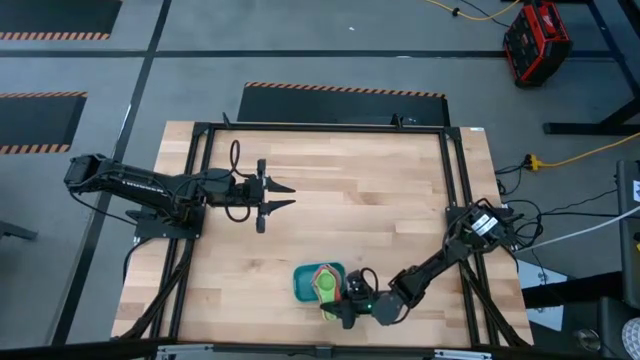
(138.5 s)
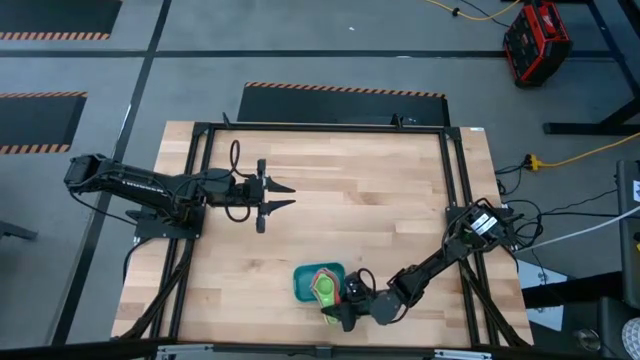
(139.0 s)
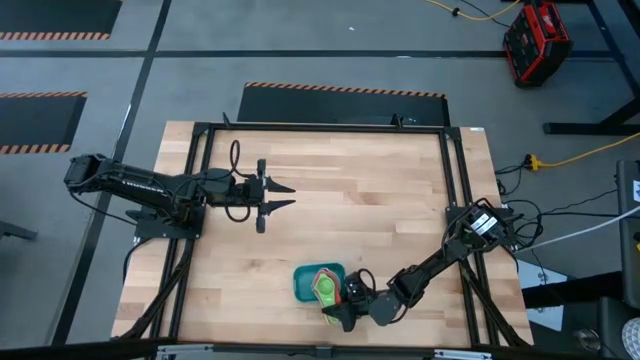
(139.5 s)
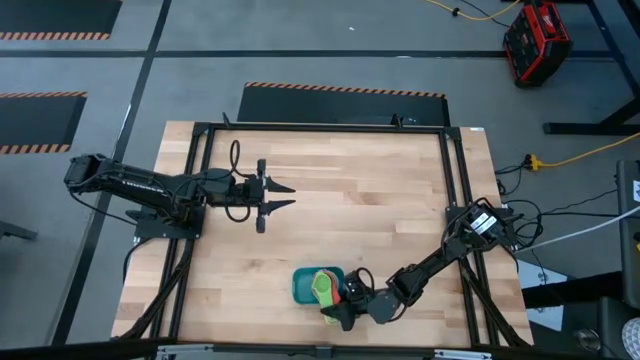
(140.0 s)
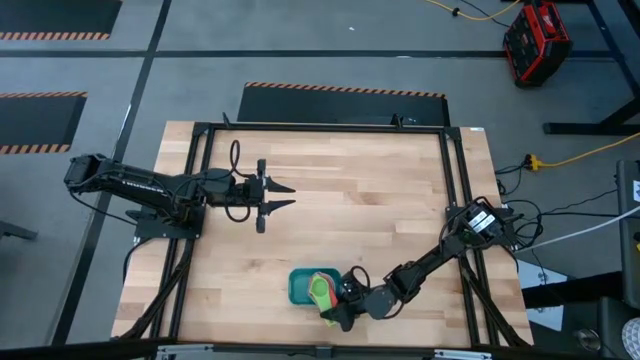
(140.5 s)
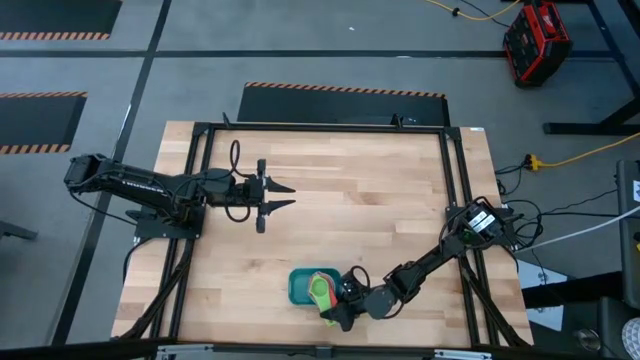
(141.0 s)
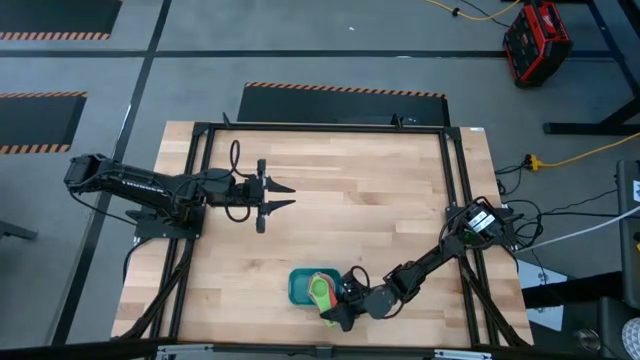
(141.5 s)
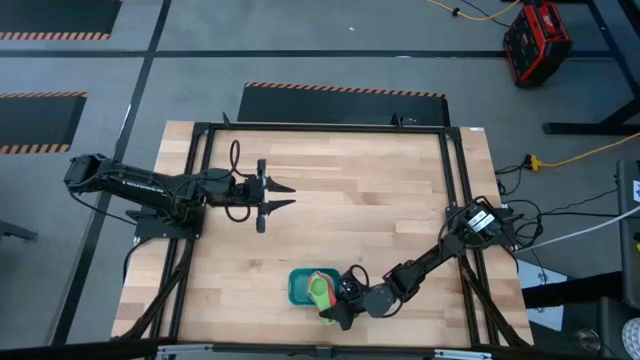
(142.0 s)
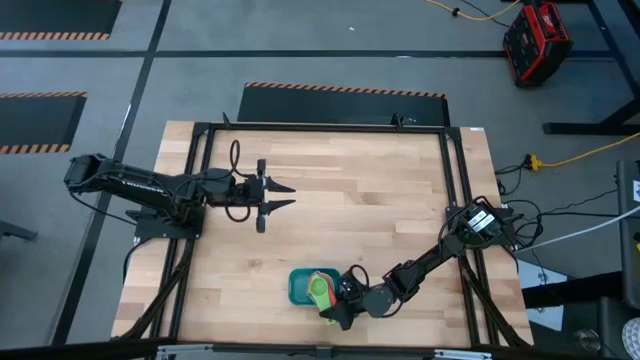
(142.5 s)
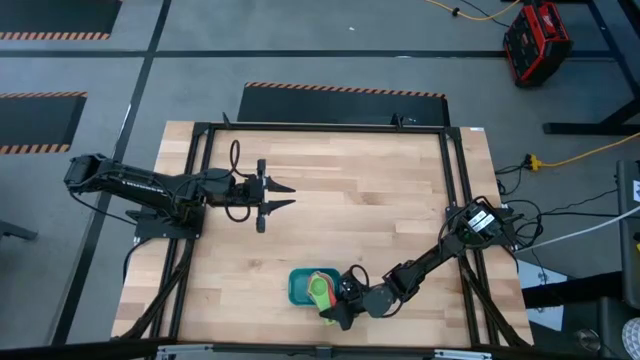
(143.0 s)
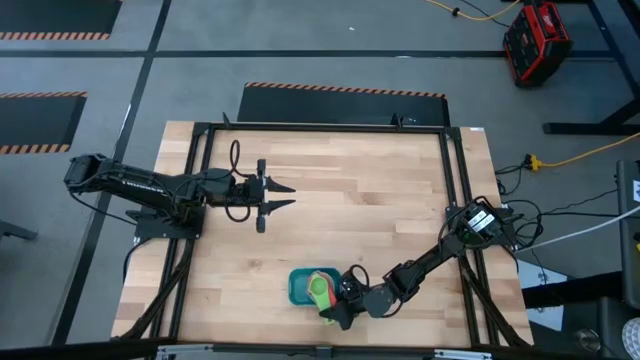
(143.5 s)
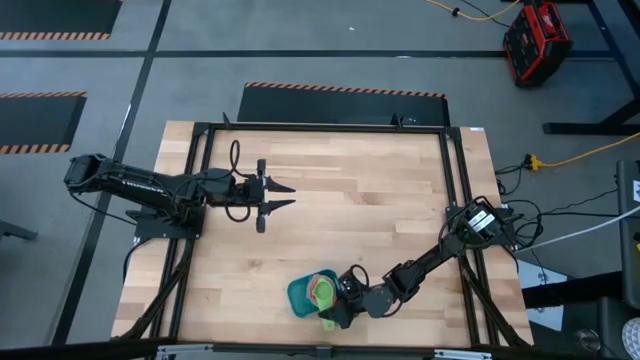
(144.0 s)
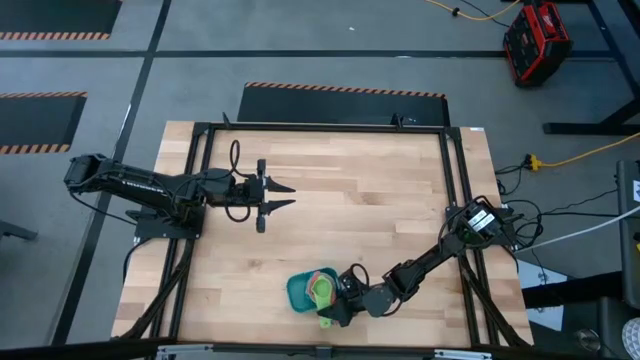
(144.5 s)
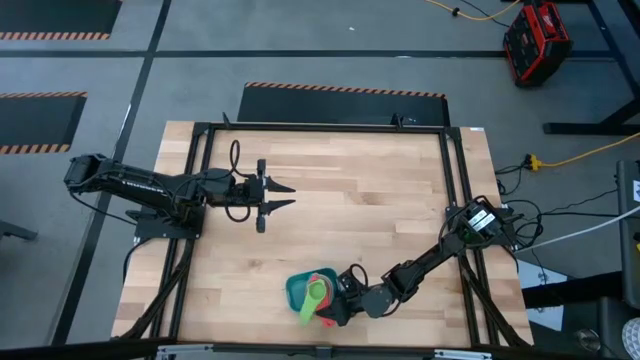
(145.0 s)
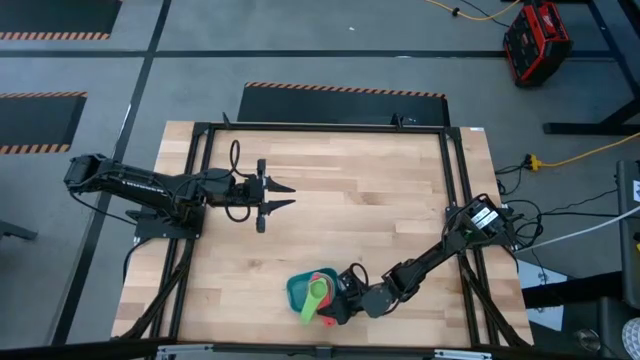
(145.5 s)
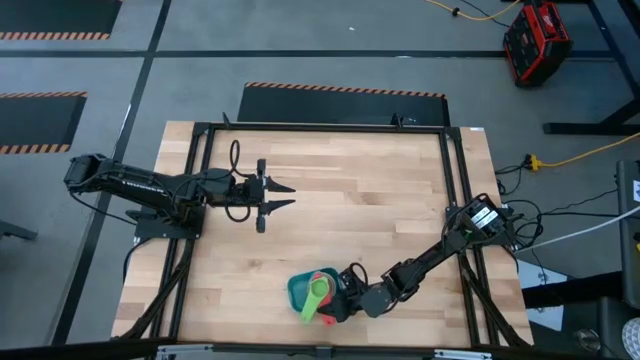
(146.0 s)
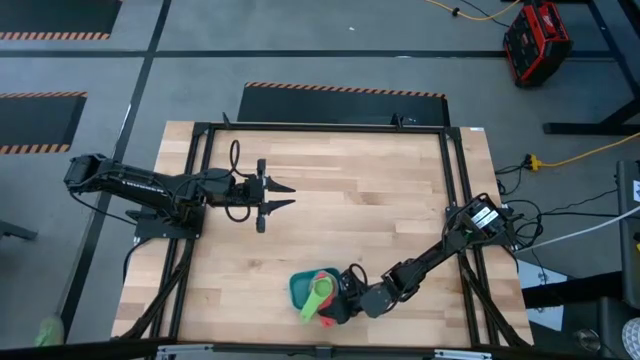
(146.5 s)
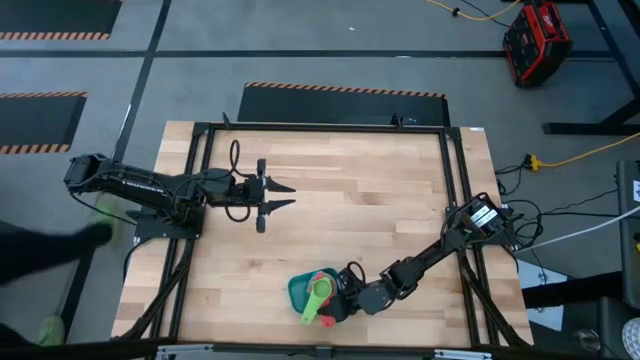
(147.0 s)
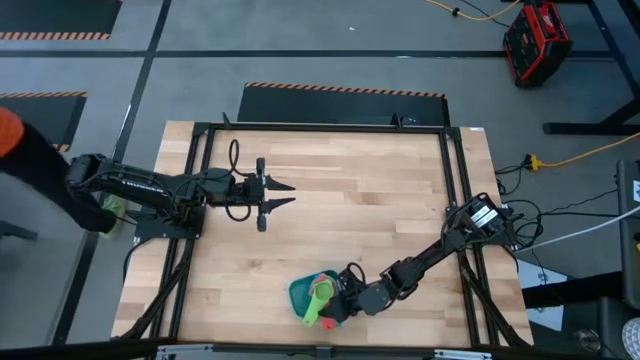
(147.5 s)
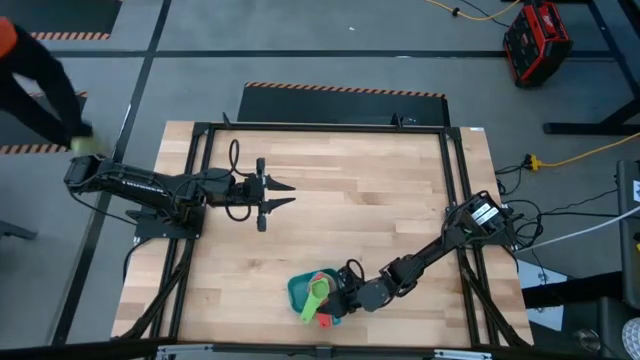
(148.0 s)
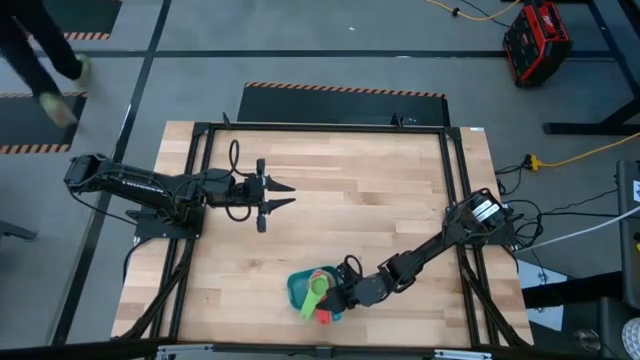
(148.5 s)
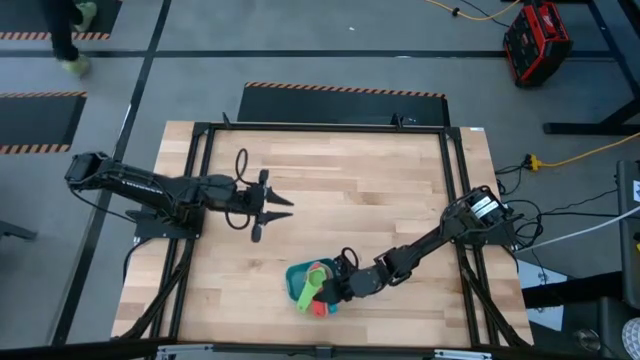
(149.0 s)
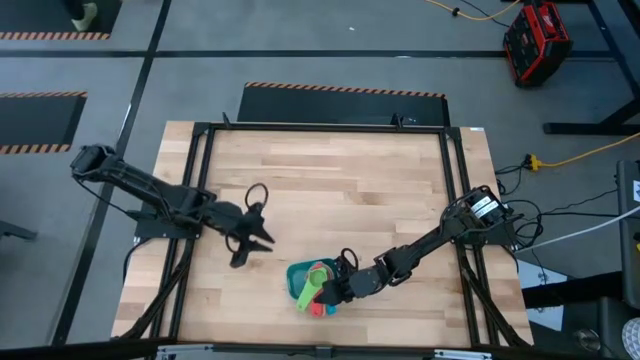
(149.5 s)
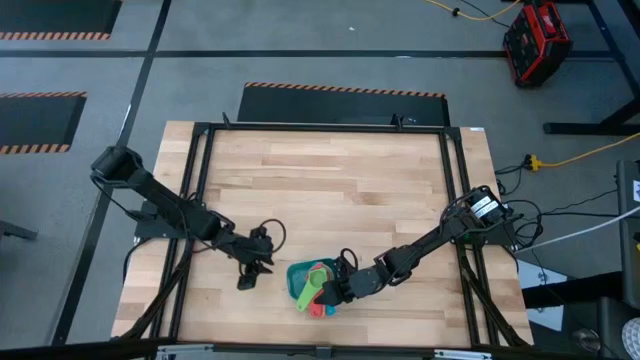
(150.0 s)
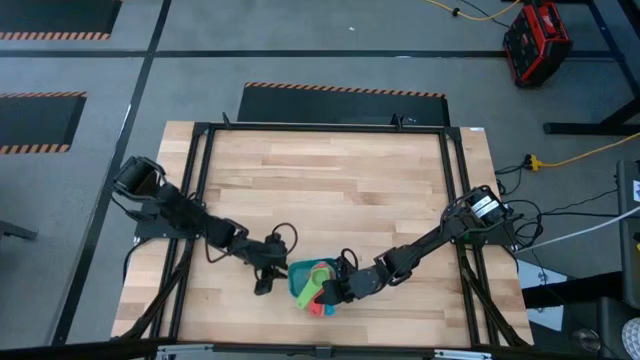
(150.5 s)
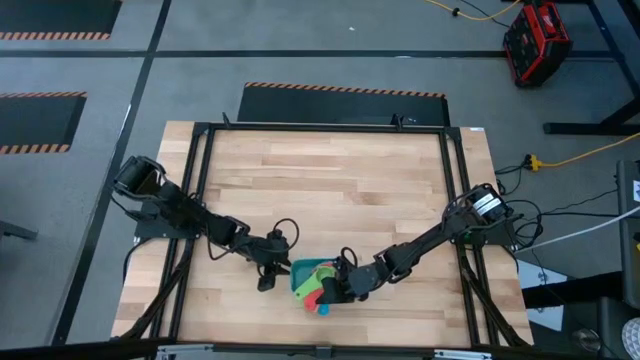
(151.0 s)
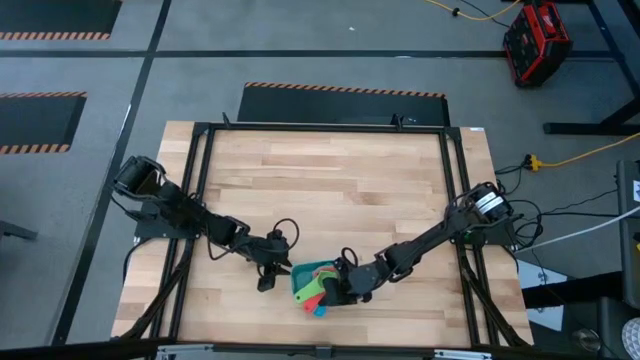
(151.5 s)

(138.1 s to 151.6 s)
Task: Nest measuring cups in basket
Put the nested measuring cups into the blue bin

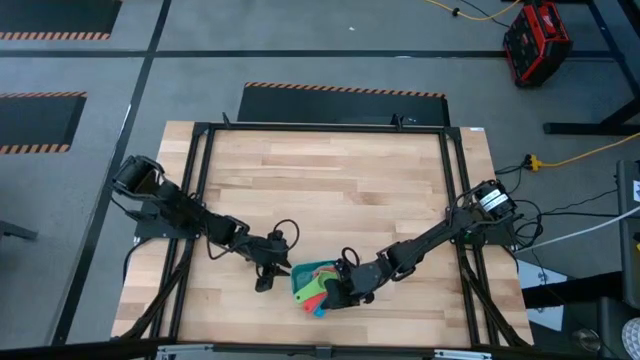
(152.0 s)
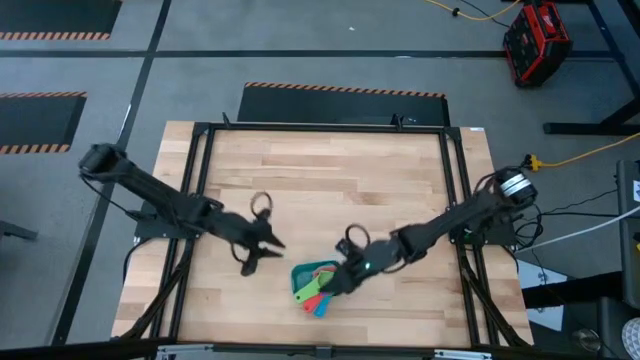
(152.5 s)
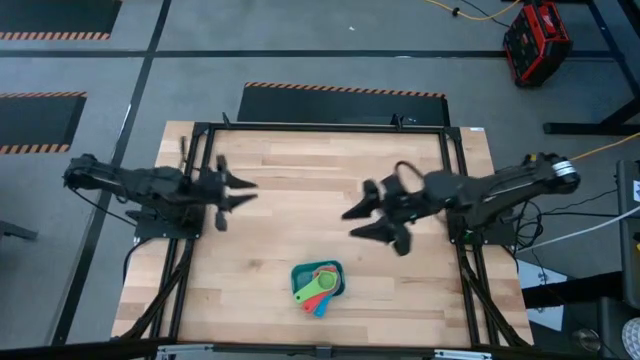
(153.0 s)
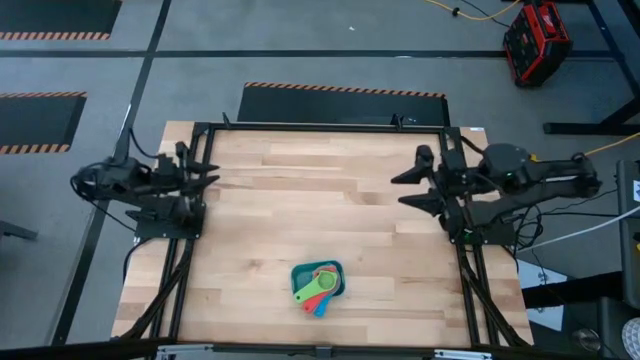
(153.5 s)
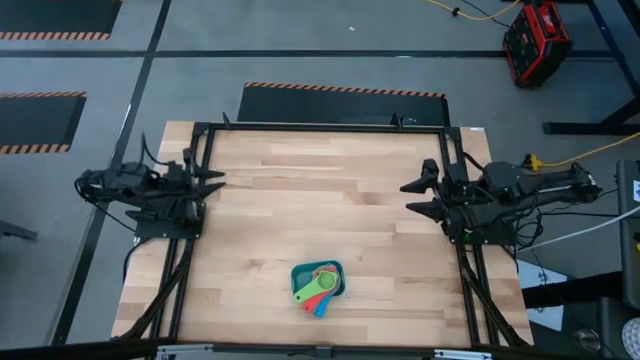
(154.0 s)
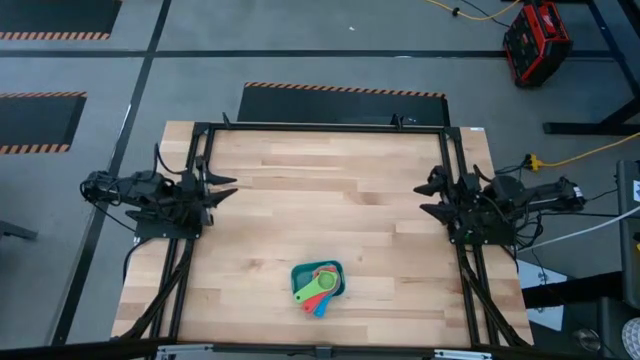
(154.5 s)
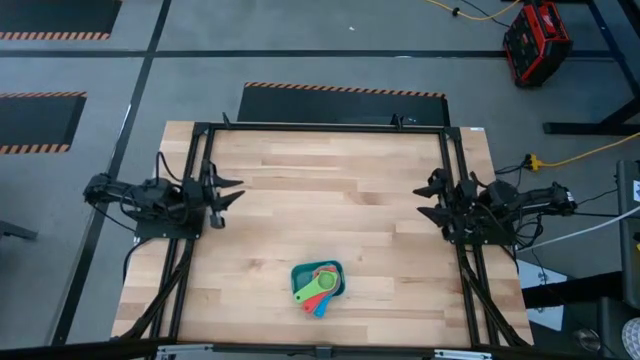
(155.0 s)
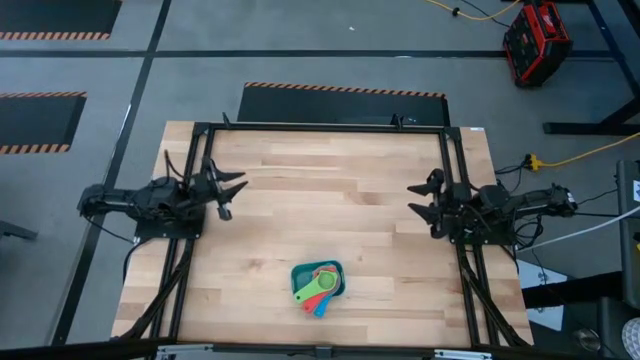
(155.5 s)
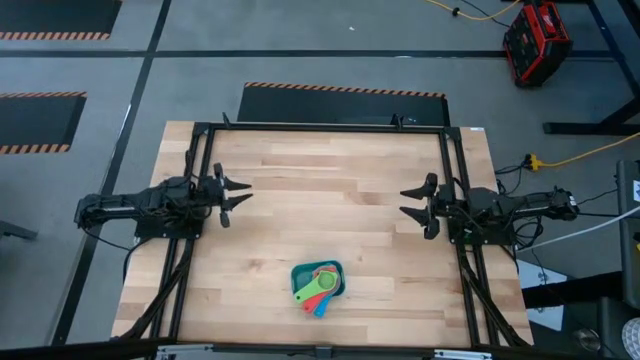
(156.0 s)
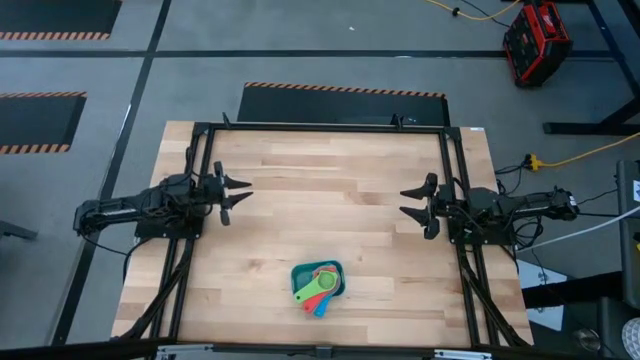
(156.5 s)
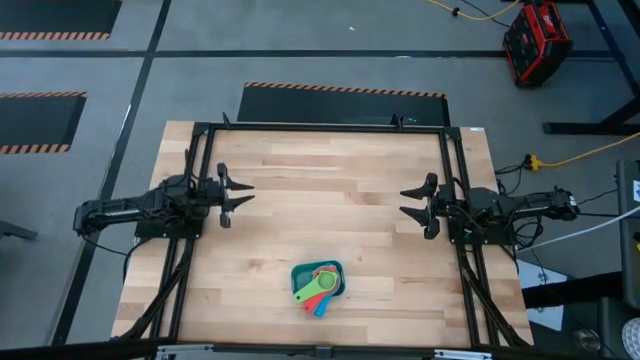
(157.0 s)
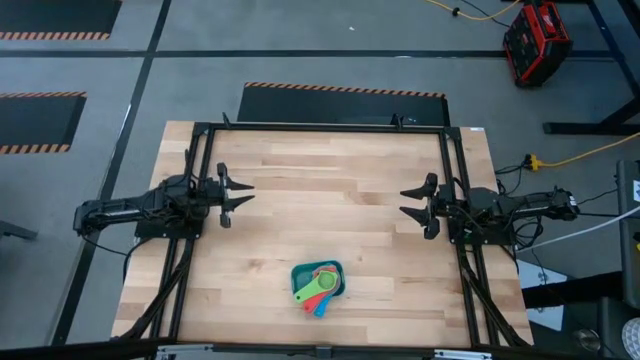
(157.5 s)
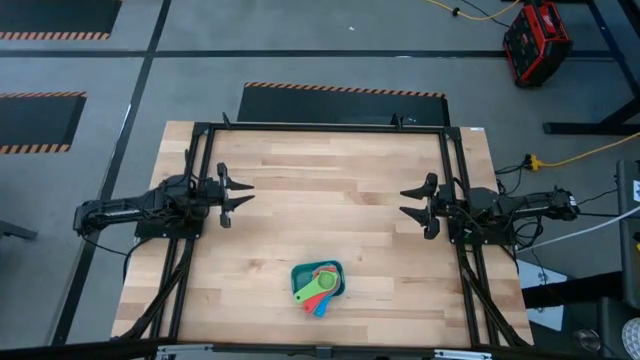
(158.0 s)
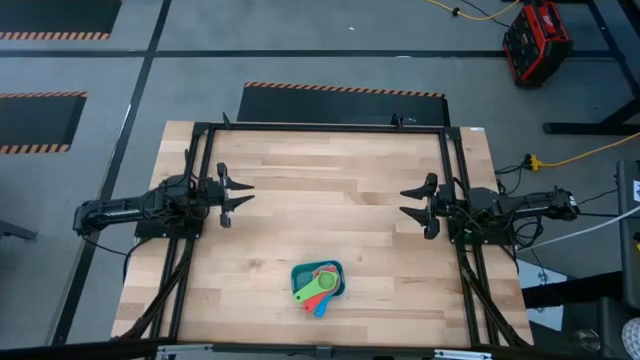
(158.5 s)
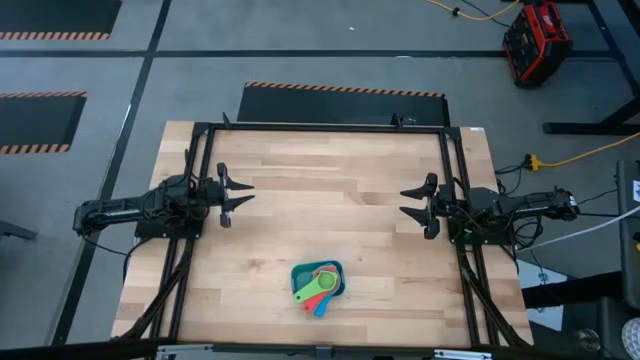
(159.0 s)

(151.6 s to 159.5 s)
Return to Home Position

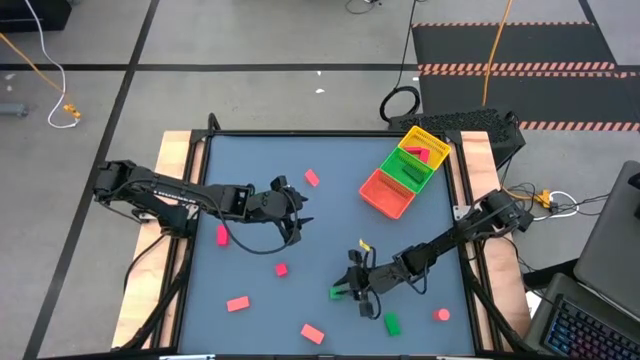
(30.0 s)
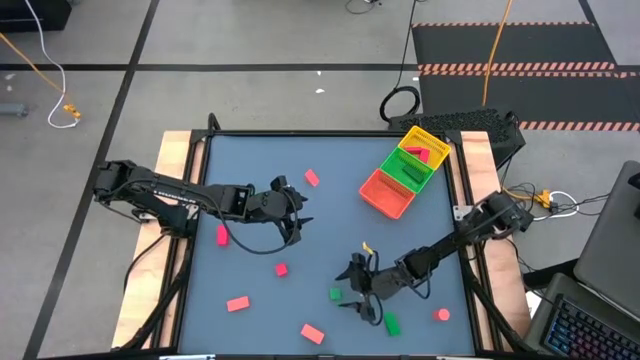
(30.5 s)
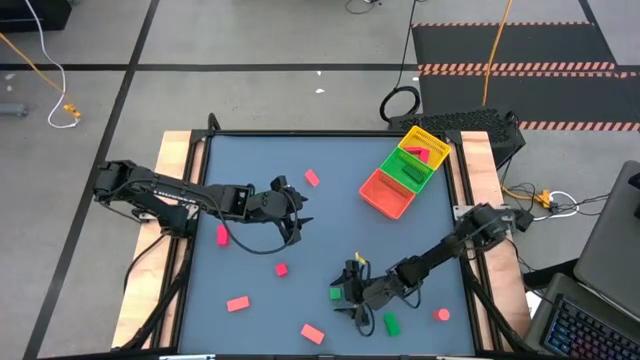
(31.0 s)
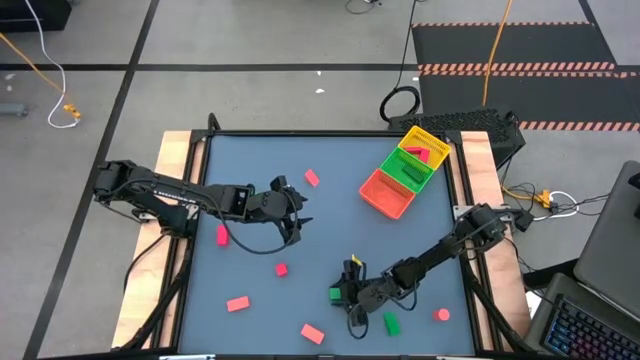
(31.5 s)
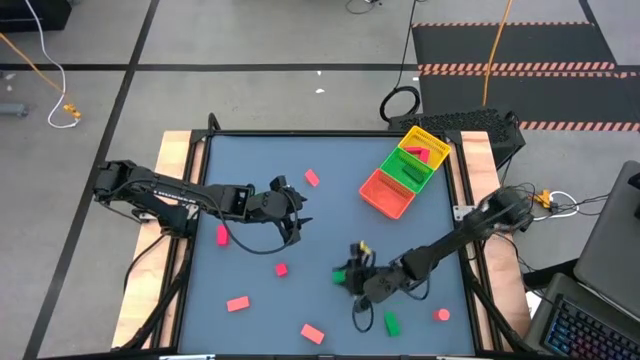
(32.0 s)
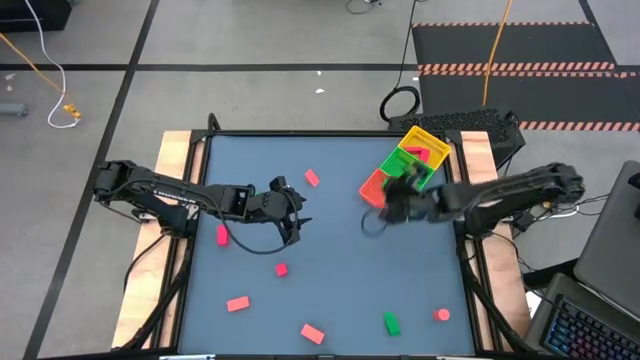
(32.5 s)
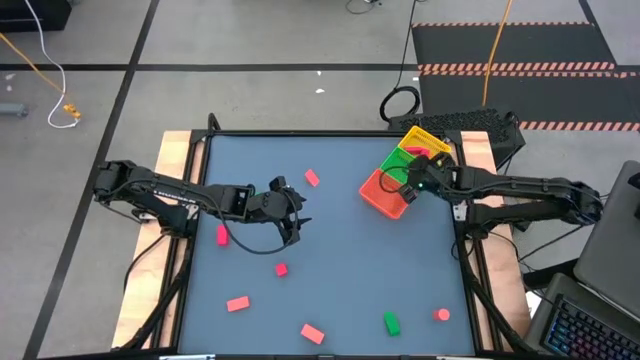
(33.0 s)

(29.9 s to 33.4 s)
Task: Sort & place blocks by color
Put the green block into the green bin
